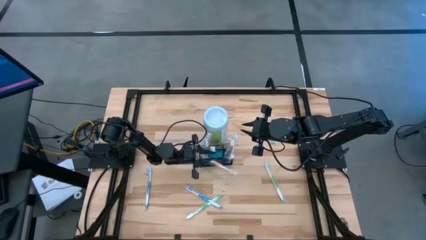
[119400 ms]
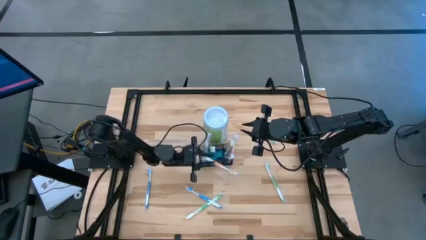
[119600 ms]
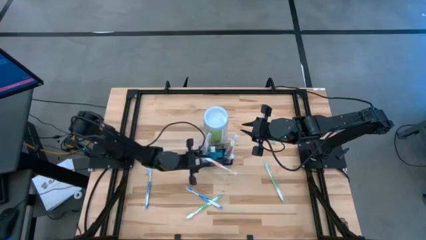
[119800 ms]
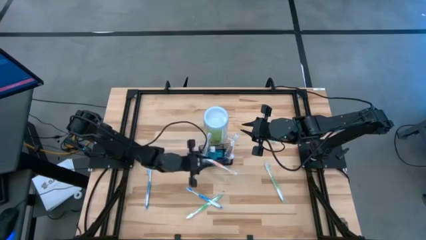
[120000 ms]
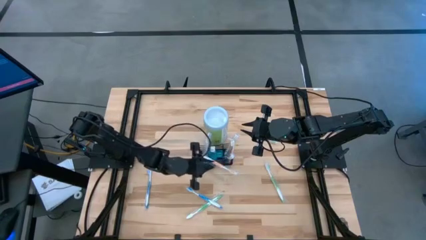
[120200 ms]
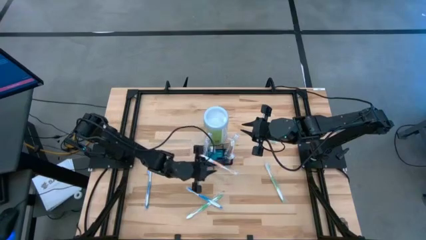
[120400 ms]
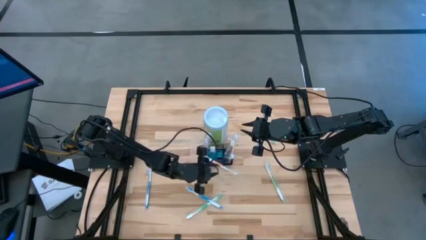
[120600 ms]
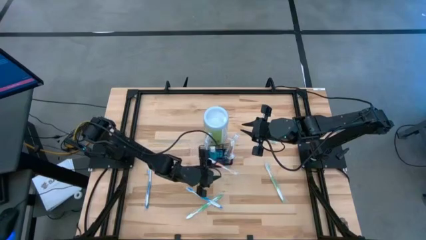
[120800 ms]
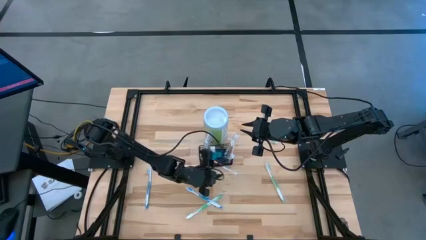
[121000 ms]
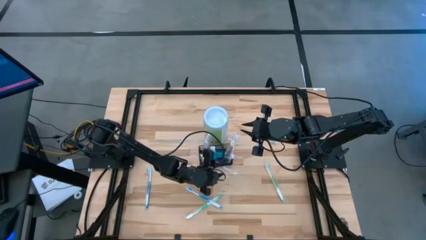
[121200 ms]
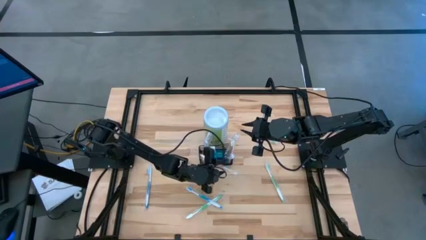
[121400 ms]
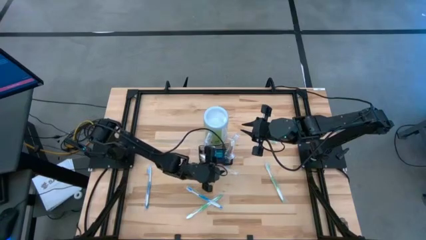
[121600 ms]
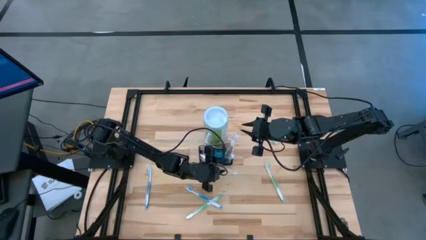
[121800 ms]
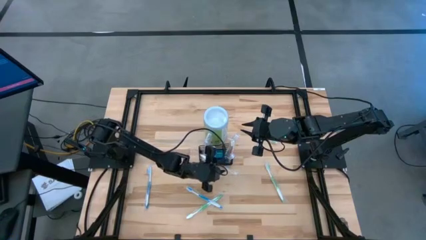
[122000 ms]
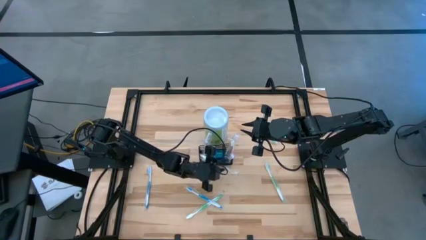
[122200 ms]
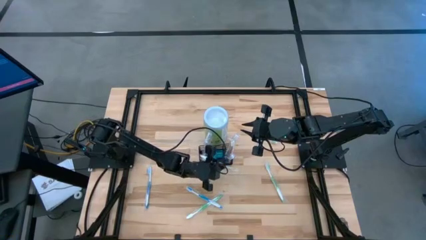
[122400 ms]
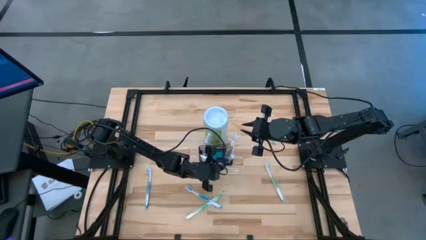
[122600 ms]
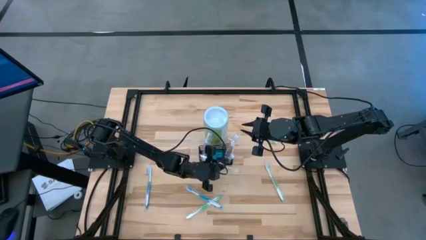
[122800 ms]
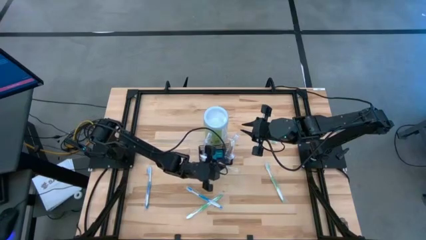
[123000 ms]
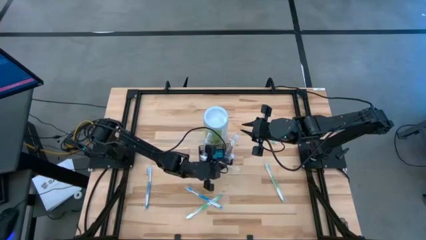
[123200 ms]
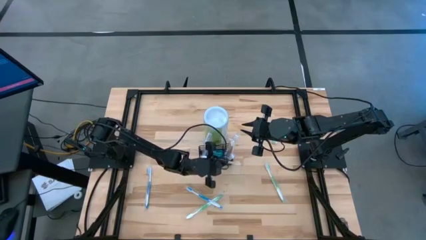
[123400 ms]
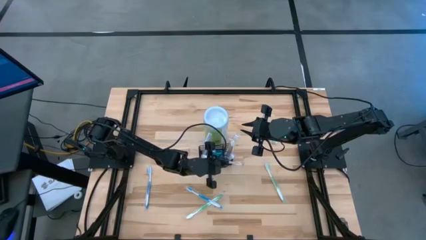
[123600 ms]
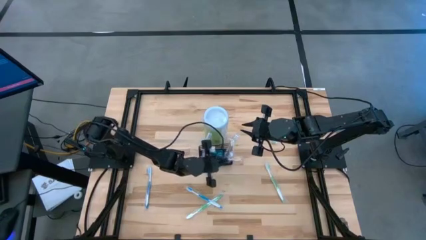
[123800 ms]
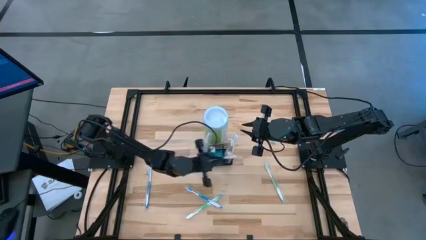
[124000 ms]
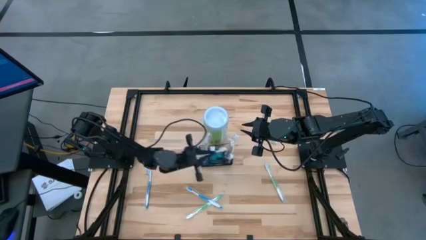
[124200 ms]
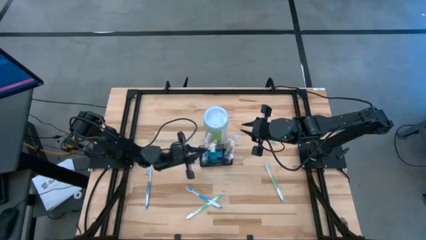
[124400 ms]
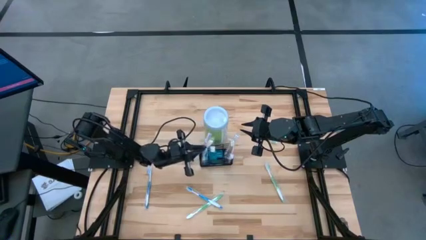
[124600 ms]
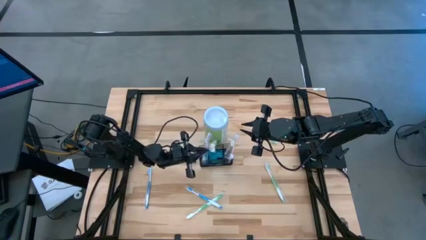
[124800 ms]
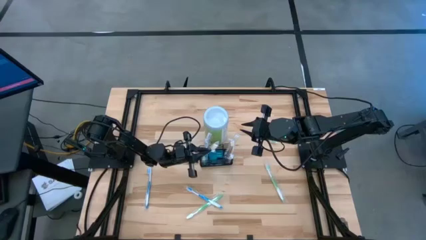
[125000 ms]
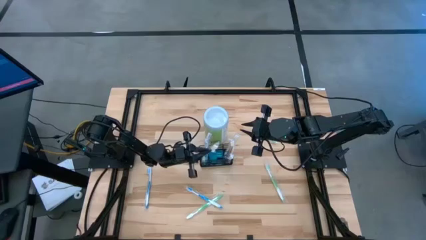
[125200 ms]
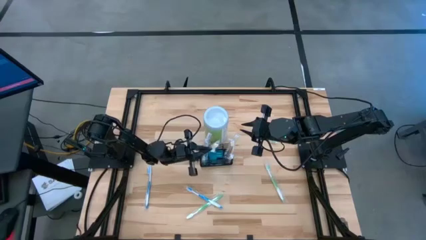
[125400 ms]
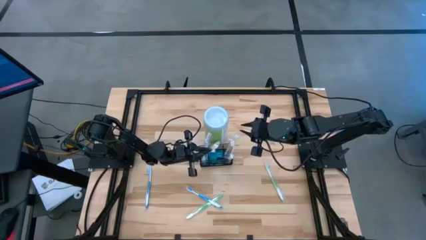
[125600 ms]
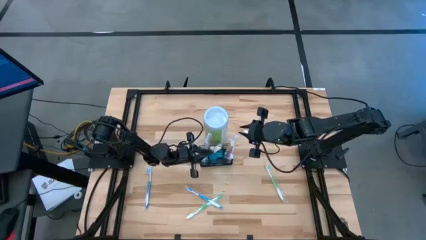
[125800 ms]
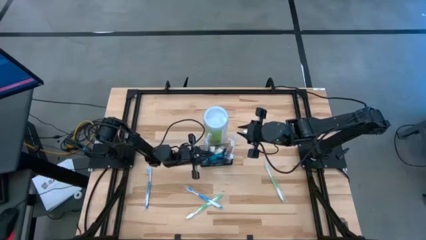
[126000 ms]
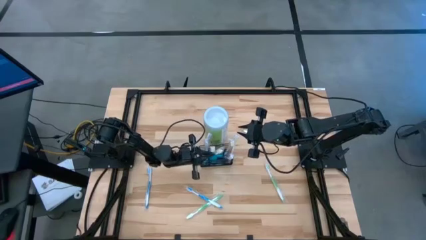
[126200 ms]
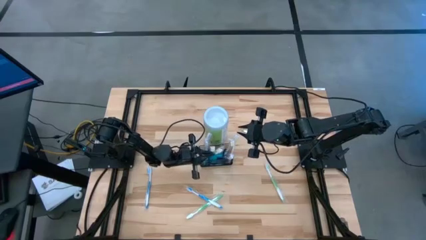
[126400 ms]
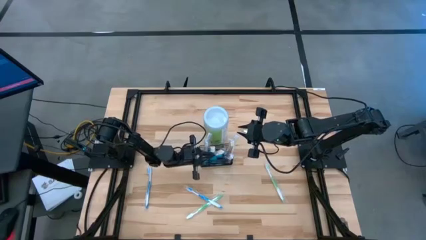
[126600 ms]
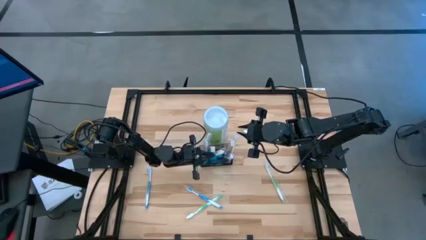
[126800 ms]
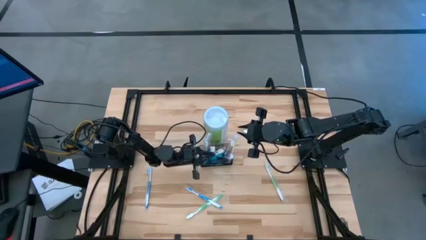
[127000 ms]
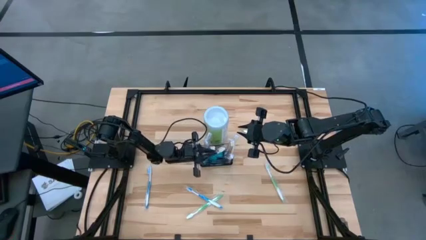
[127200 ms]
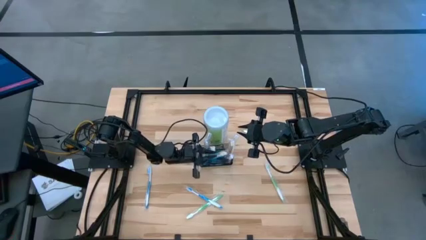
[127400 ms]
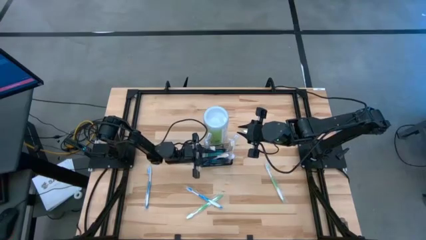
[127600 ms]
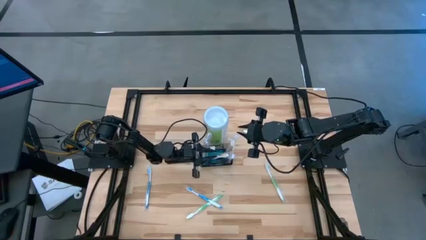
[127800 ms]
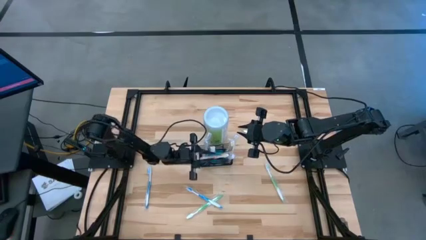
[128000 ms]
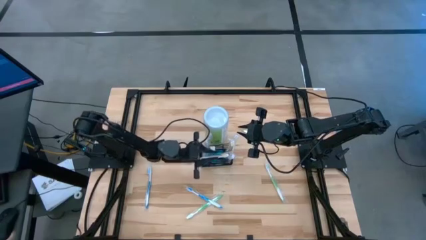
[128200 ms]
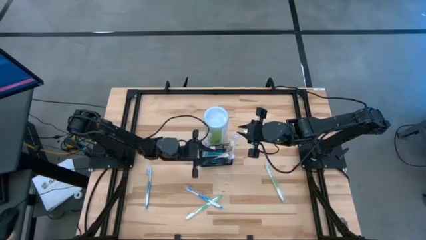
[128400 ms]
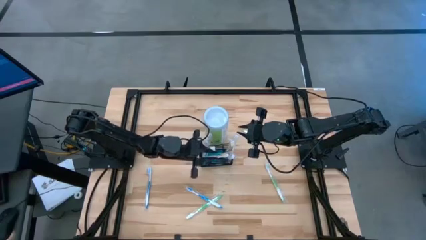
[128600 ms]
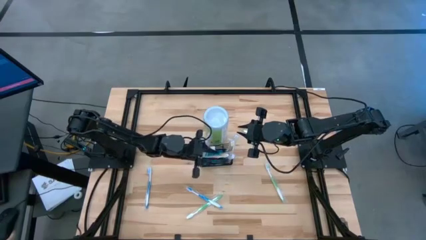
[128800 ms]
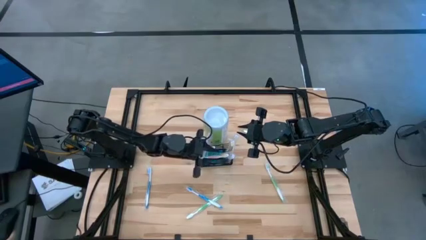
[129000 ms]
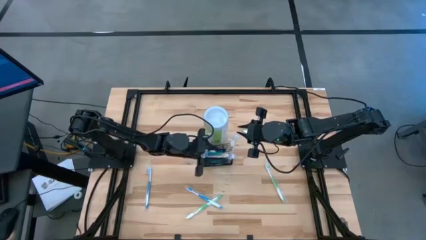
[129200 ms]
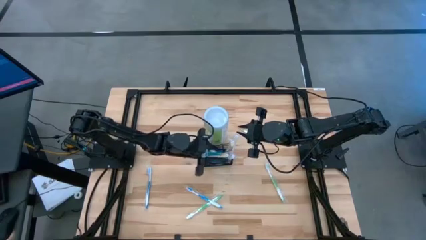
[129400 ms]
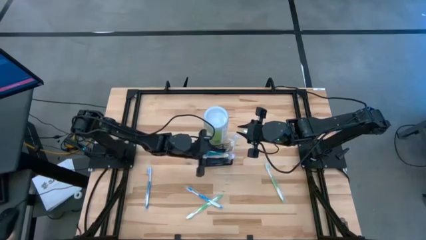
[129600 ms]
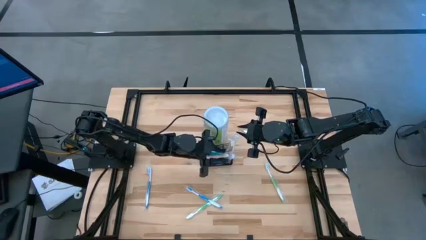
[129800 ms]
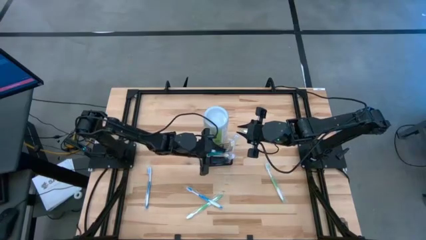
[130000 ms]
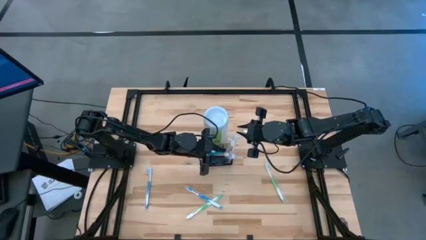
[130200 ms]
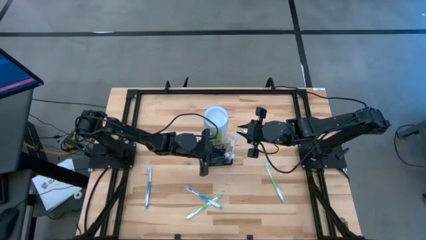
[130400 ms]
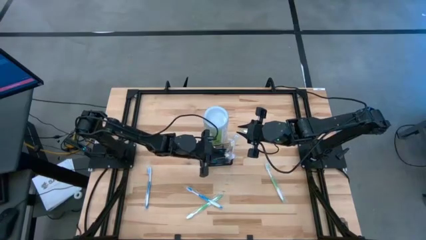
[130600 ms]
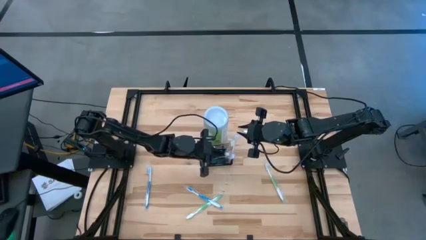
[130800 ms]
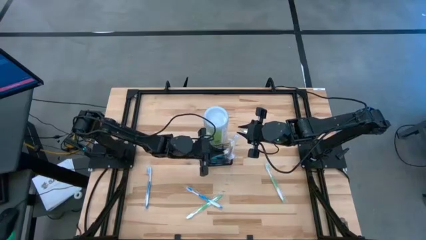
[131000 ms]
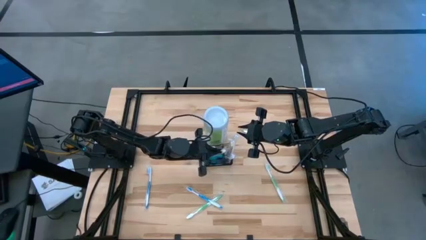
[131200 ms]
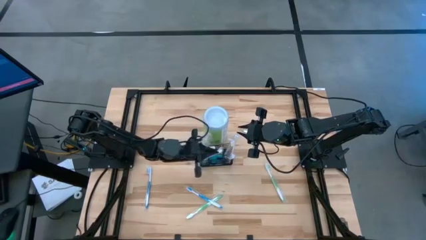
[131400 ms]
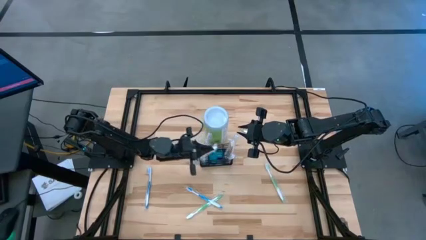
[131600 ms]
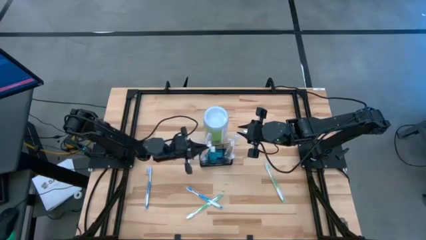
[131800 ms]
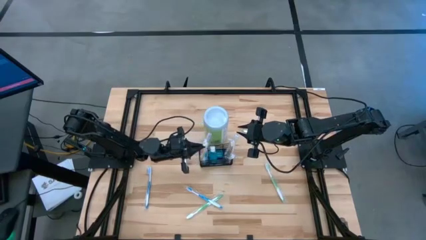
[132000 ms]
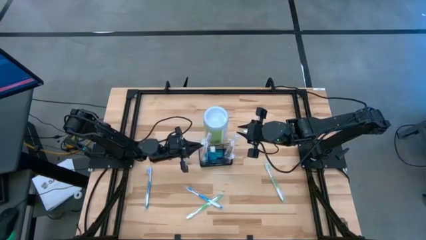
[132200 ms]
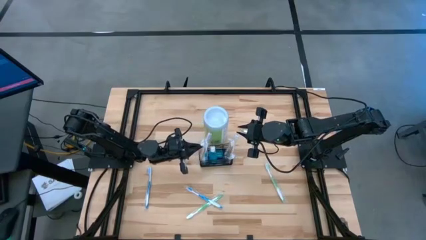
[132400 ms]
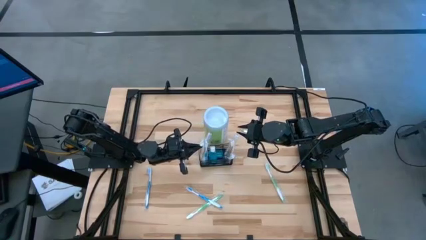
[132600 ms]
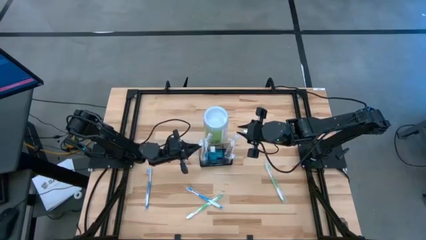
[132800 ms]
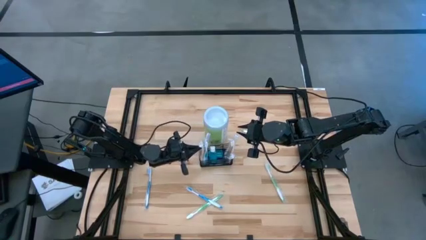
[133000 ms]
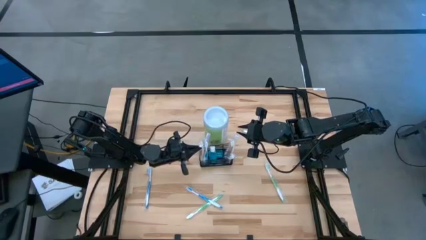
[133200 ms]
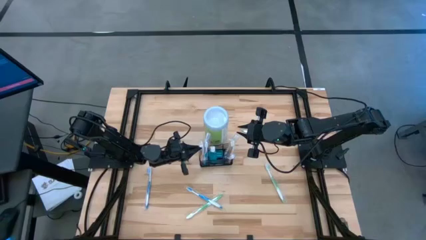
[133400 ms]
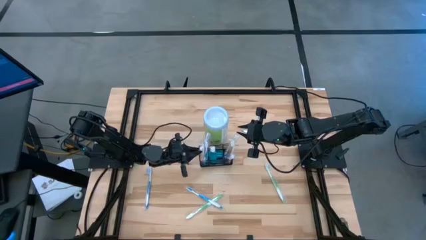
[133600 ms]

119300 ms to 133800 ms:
Task: Pick & Place toothbrushing station
Put the orange toothbrush into the wire organizer

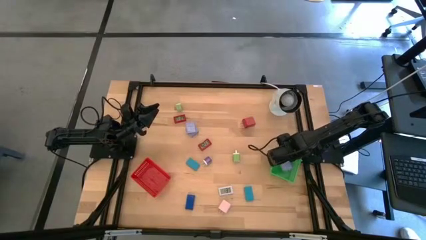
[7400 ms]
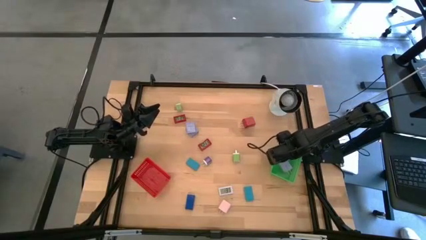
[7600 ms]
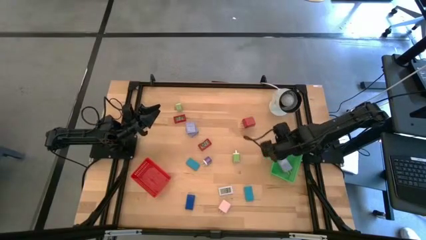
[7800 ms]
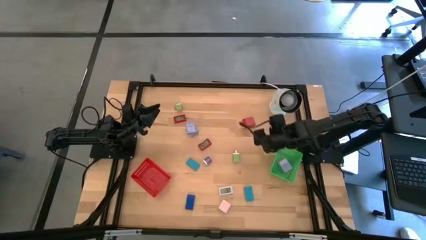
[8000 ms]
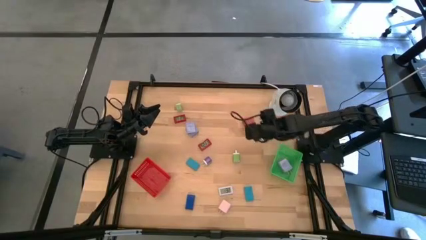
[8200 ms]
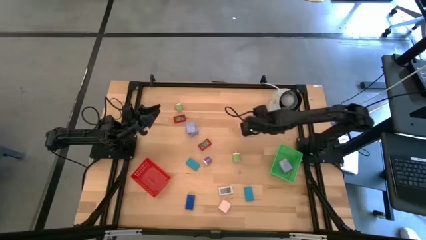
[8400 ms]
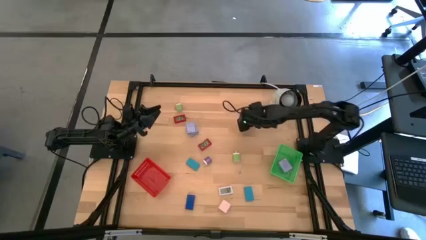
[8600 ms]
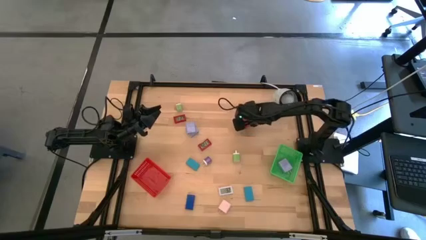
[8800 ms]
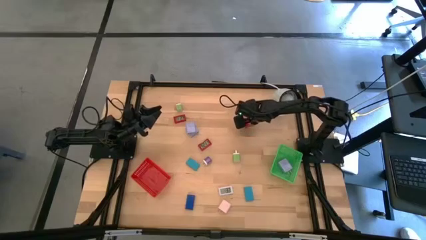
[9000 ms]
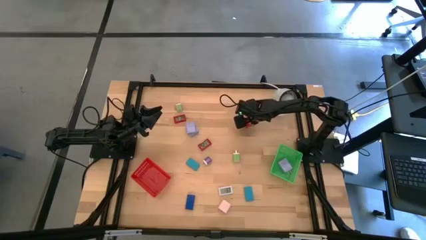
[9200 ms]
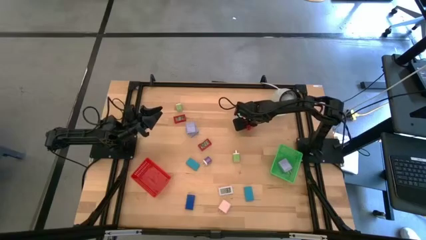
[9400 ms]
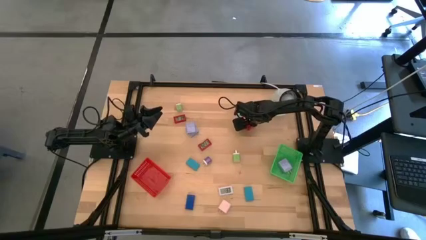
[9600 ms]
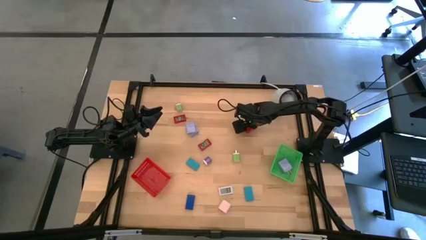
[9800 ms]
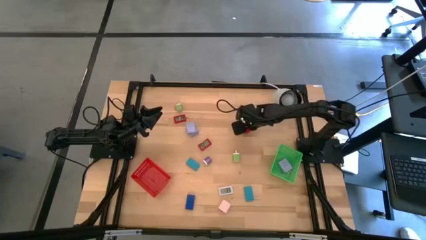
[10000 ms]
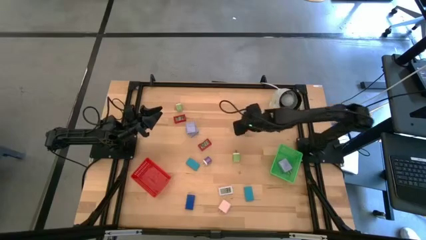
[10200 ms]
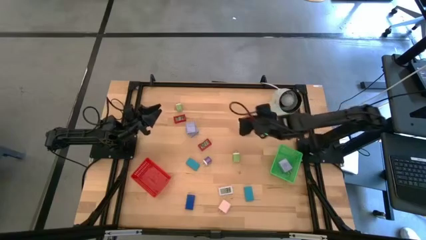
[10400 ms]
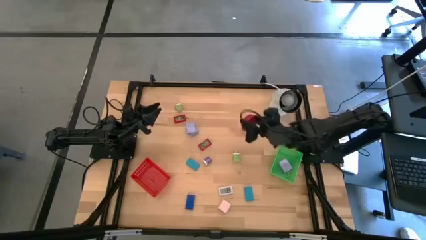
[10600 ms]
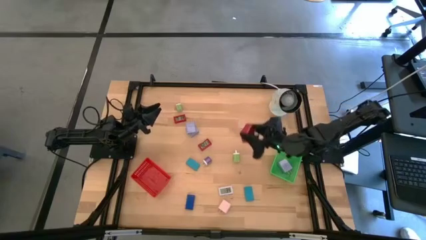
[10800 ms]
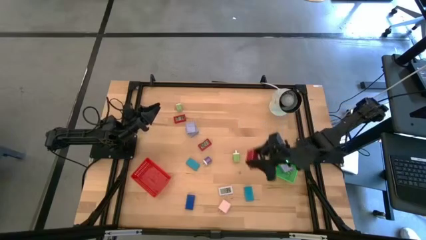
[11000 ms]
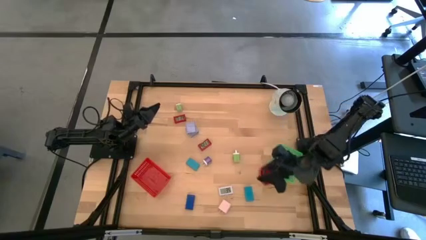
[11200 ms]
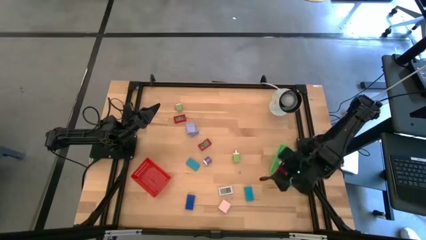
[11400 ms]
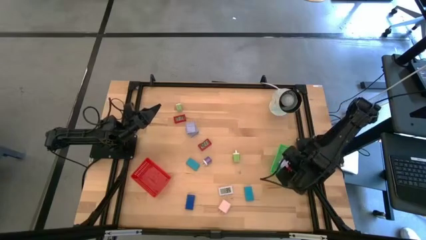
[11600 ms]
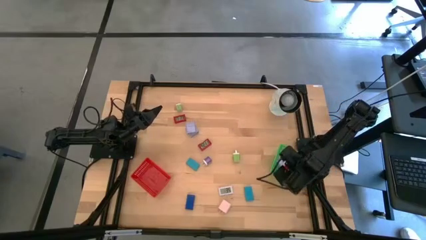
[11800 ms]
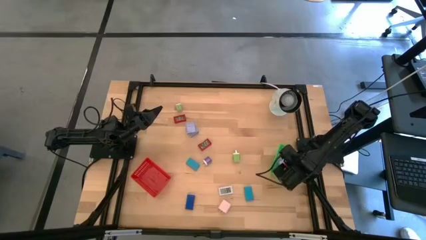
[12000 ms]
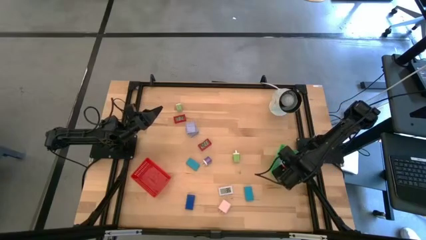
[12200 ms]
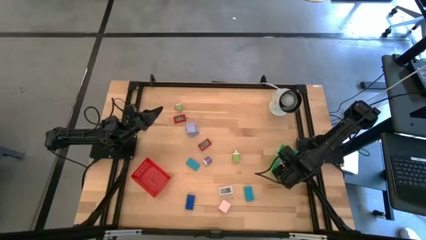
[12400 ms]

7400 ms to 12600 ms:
Task: Pick & Place Office items
Put the red power adapter into the green bin
